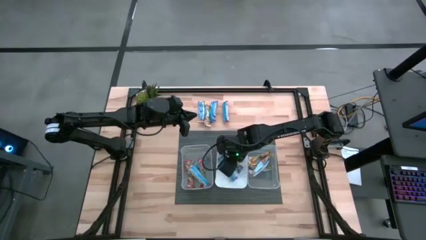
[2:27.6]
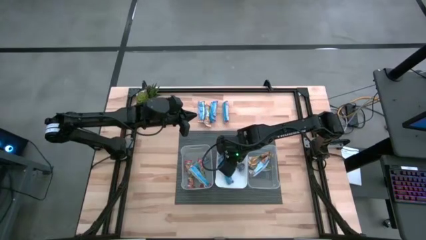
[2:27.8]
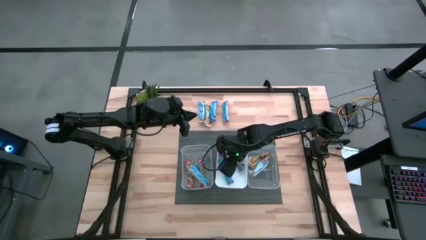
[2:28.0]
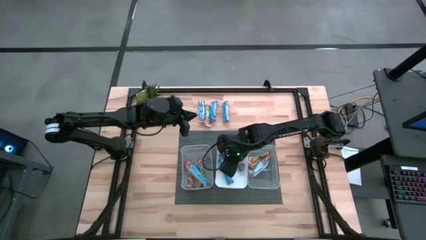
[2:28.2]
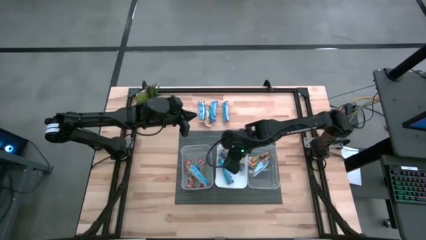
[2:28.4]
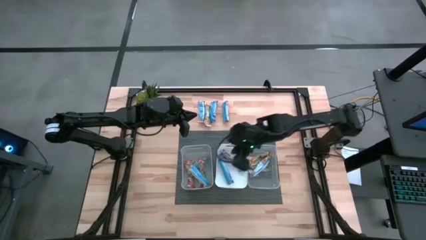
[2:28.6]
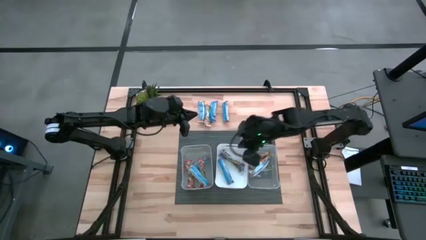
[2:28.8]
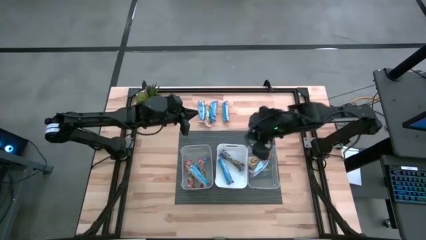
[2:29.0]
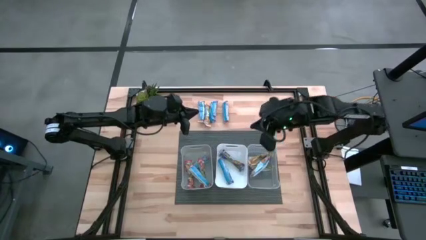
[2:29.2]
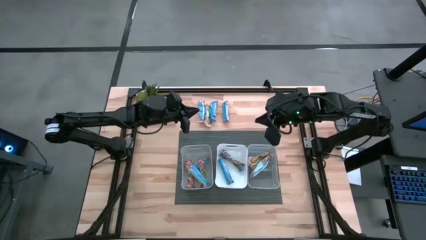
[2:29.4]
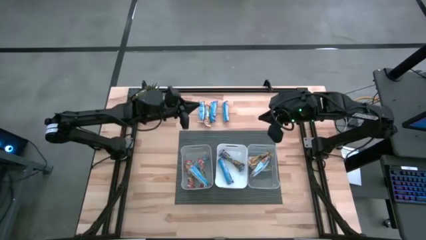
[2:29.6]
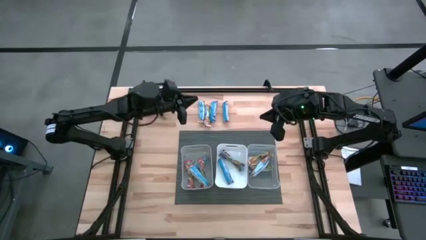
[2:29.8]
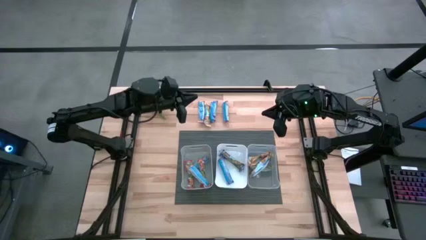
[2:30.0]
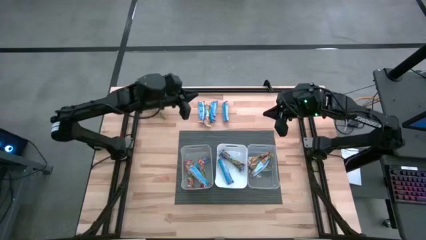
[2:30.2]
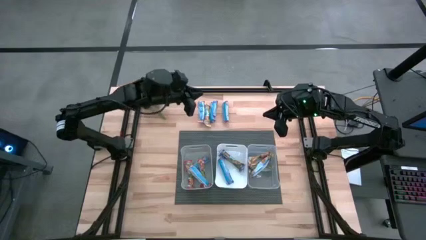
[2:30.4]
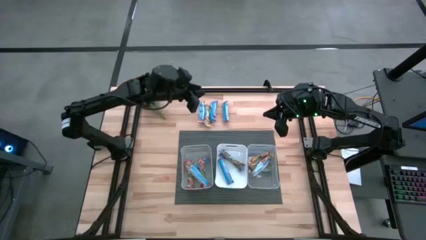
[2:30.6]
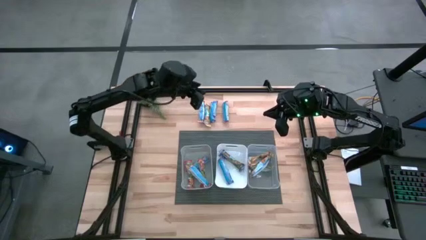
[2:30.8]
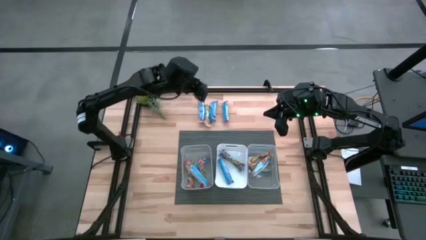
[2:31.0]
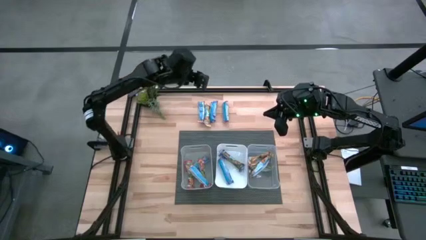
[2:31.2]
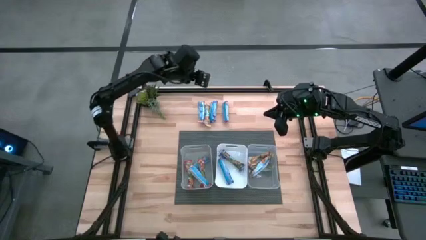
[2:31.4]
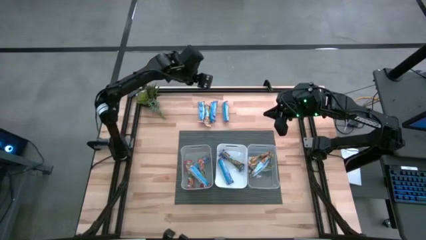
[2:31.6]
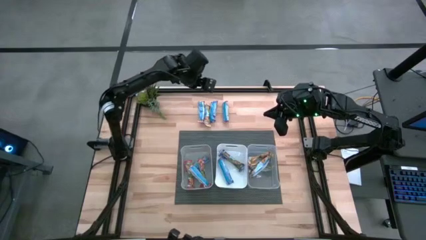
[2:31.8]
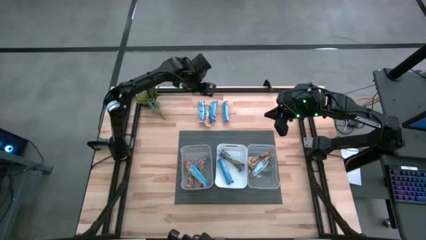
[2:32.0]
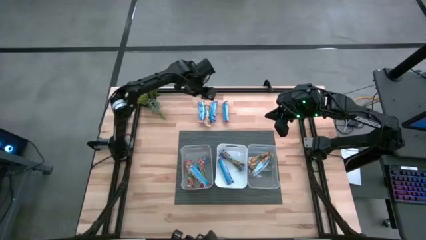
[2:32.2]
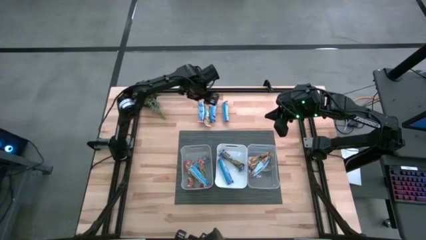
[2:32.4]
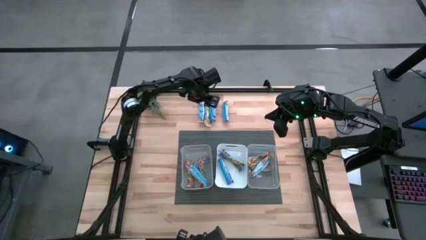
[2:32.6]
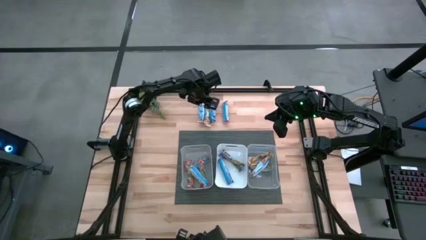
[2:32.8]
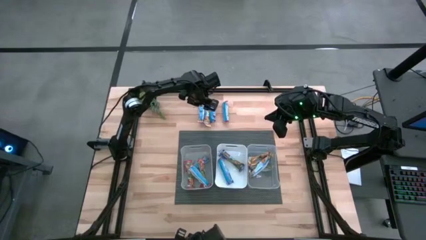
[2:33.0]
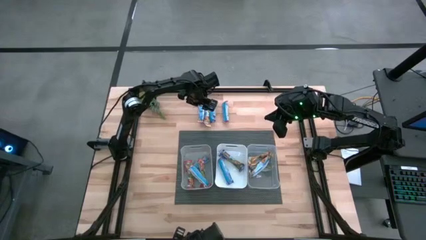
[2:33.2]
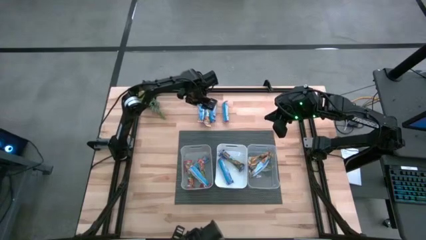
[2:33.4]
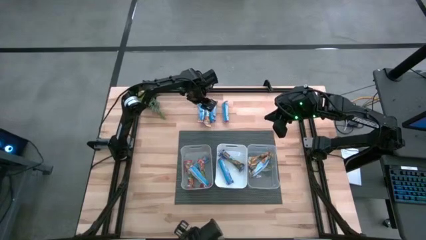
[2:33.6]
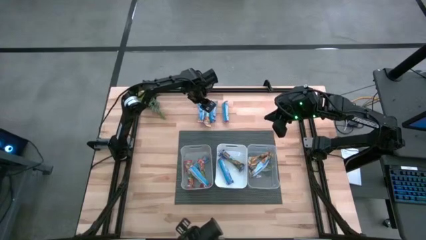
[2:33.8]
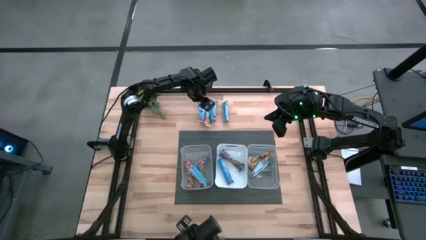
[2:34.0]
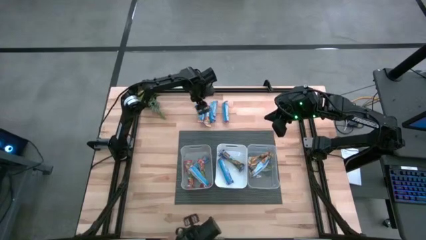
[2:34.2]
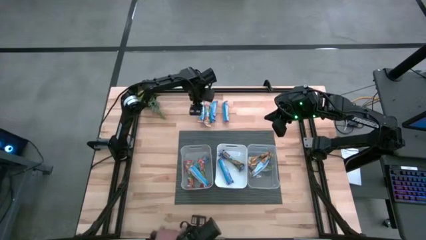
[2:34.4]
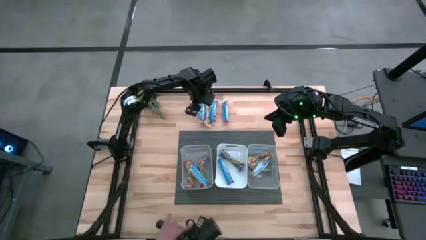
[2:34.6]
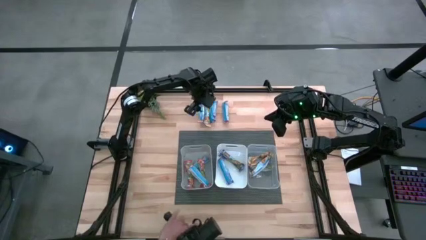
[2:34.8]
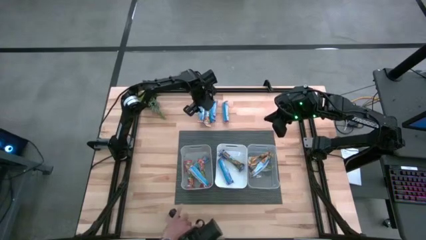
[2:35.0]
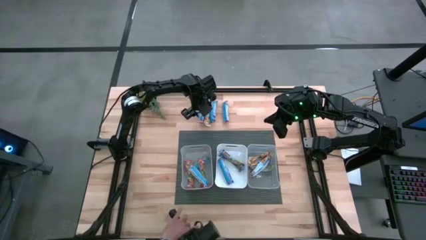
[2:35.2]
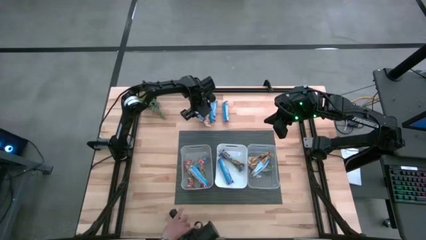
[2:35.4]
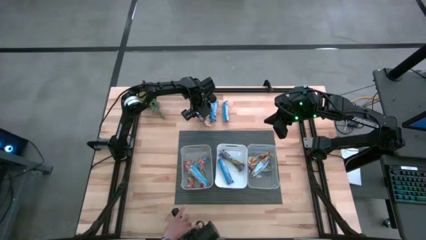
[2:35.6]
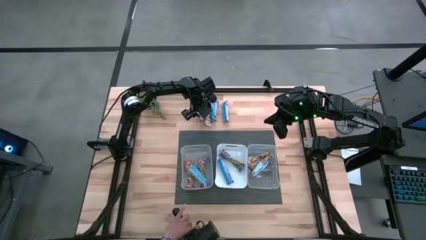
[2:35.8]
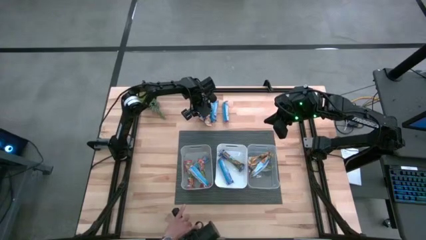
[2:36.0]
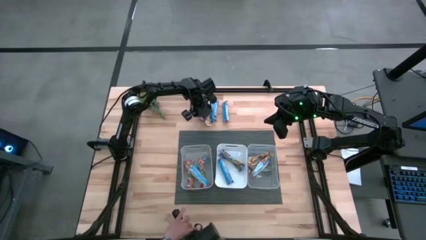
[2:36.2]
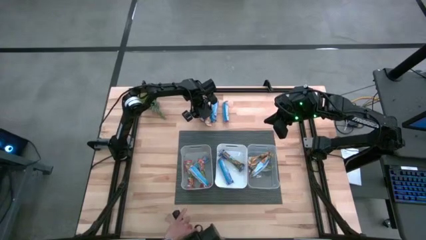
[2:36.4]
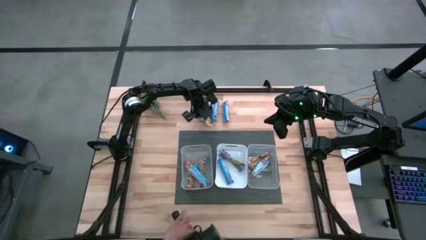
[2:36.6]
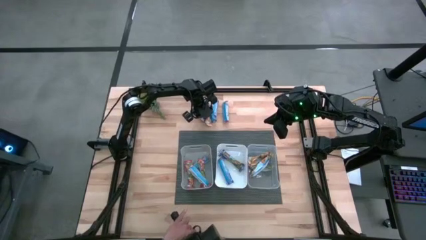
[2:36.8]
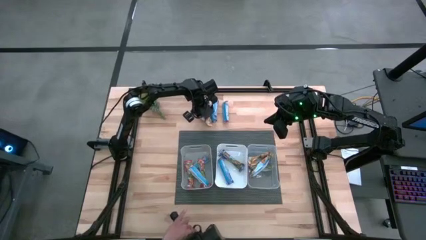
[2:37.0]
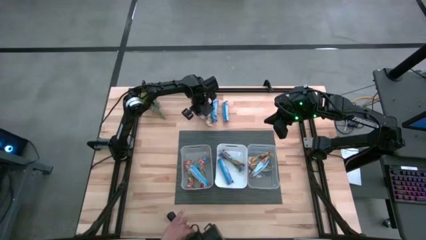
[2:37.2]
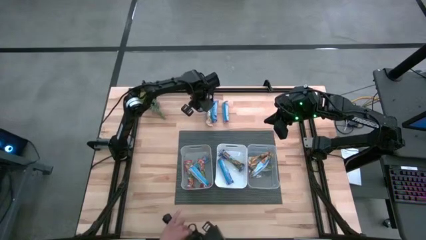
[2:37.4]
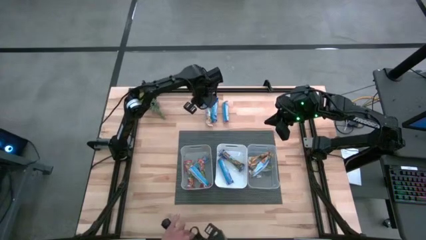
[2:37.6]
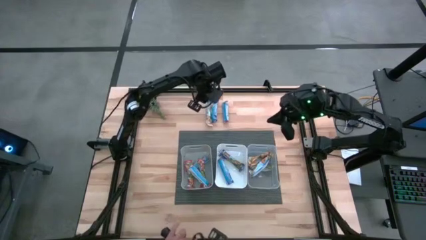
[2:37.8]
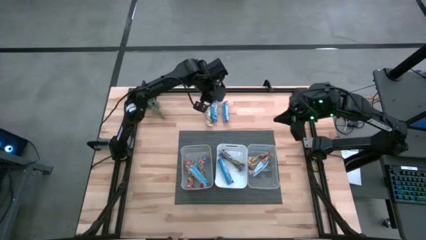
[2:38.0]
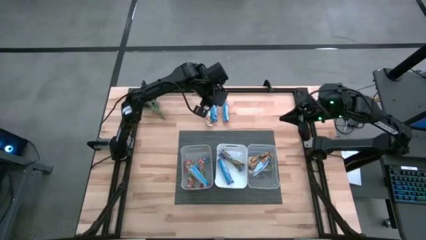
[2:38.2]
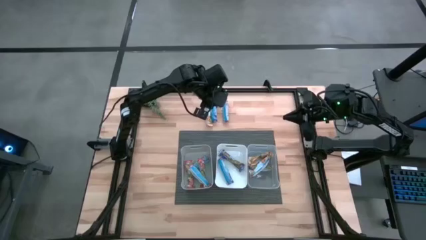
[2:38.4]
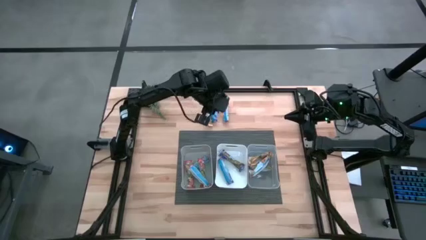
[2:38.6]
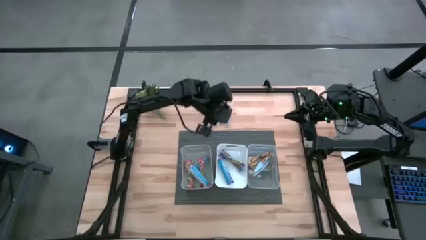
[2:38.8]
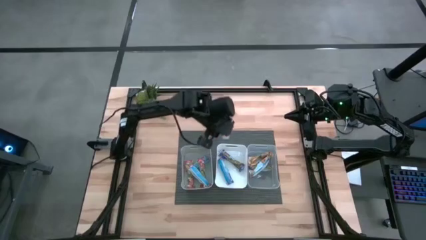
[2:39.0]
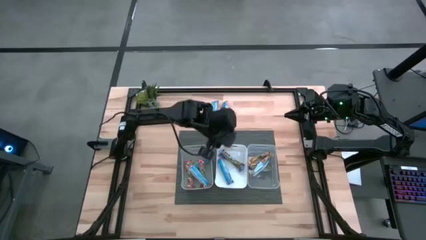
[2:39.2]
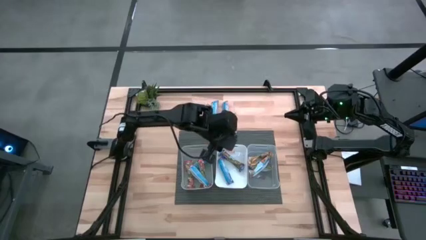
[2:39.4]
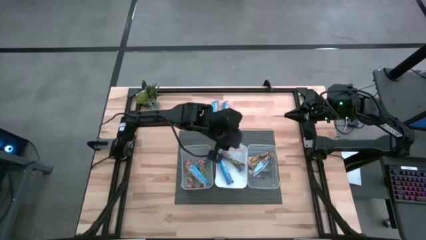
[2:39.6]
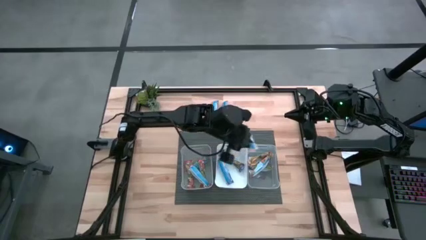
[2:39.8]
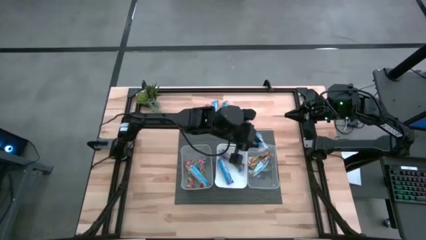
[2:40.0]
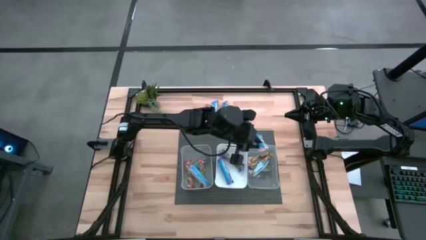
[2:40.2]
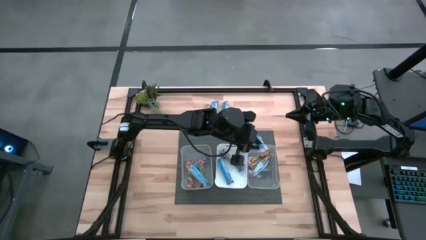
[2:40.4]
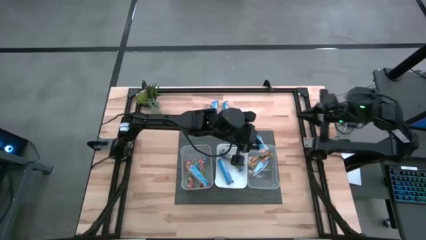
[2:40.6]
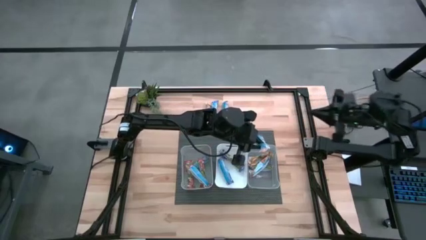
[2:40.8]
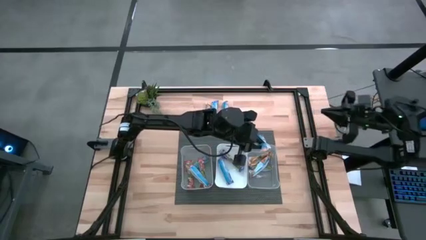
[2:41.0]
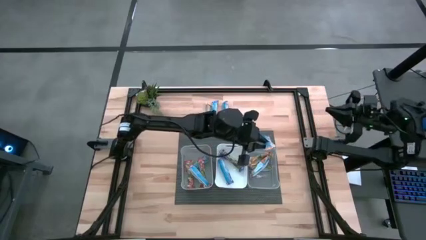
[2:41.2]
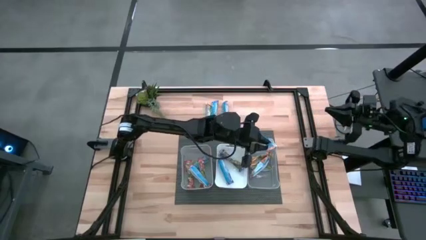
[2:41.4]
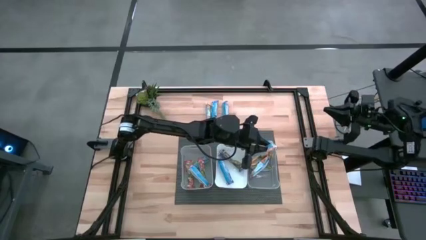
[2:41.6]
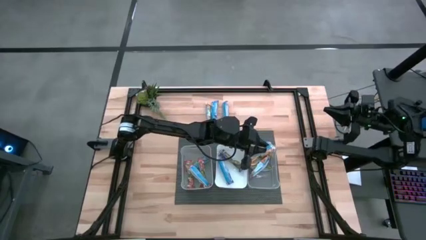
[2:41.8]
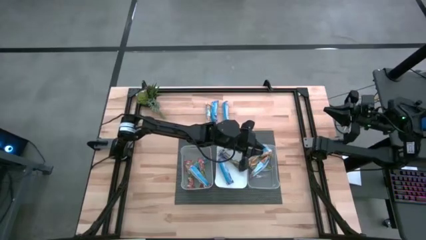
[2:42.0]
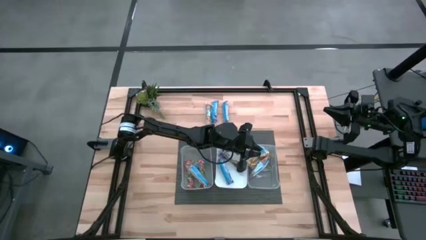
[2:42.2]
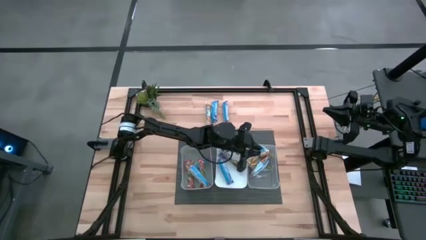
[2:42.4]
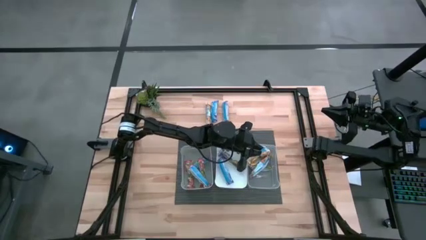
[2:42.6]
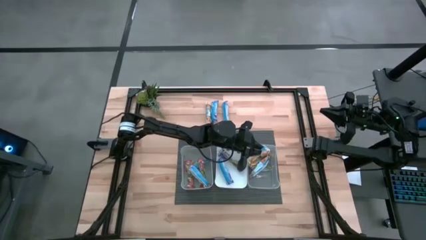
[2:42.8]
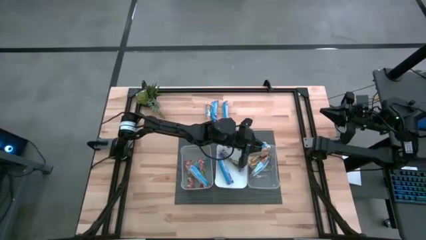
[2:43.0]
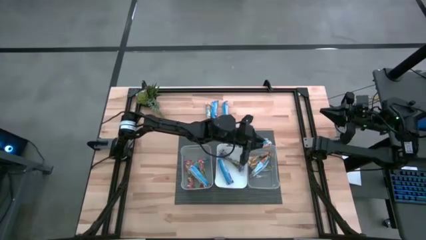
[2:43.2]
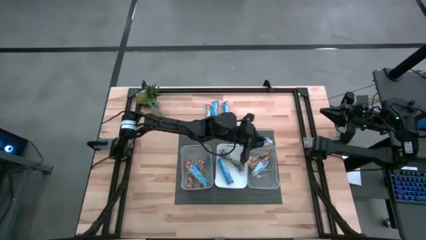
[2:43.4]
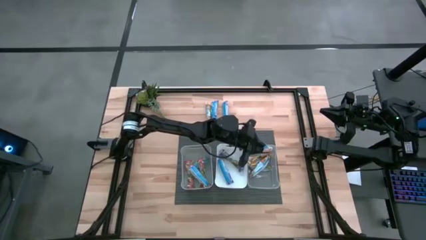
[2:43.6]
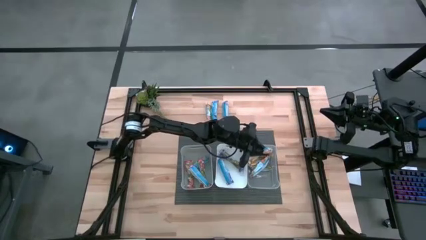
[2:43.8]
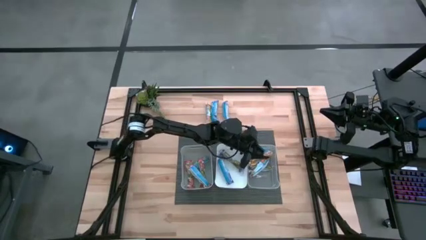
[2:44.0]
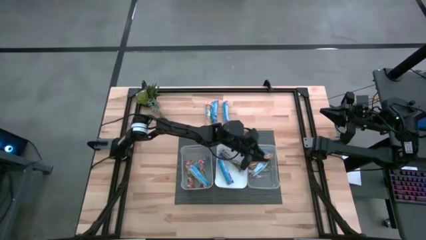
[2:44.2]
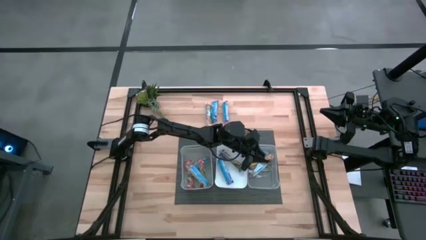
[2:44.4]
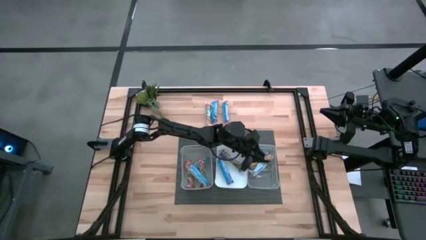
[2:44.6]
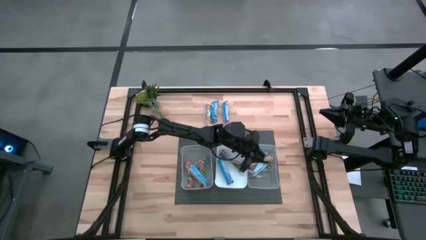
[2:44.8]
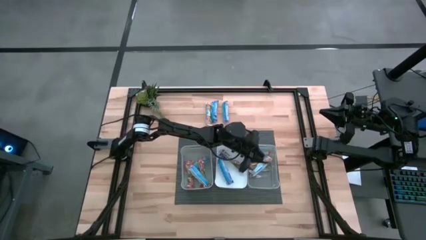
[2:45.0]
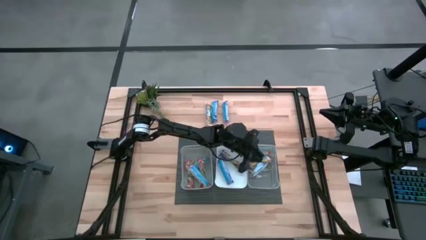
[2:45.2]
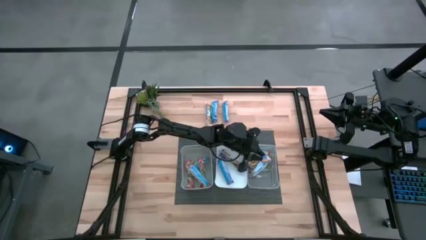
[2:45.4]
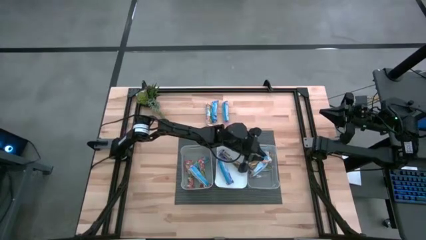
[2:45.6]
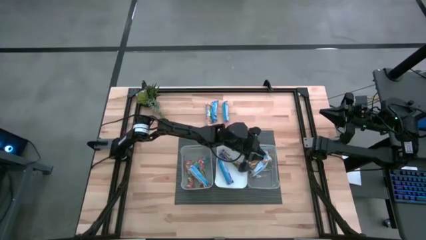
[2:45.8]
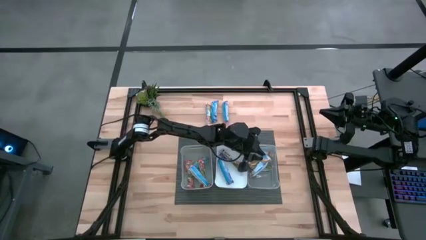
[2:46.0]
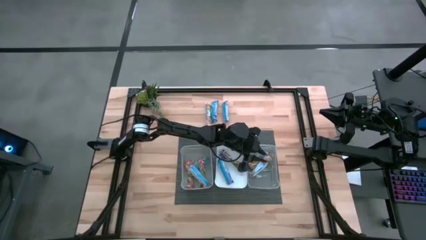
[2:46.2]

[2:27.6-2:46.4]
Task: Pick and place Granola Bars by type
Put the orange granola bar into the transparent bin
